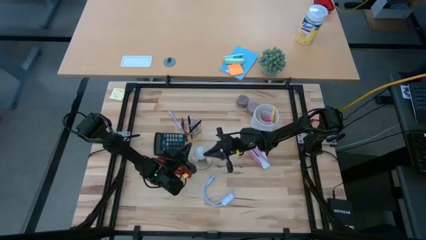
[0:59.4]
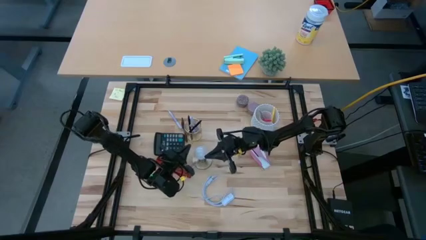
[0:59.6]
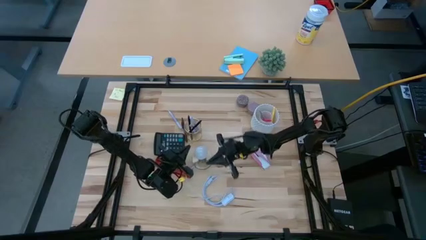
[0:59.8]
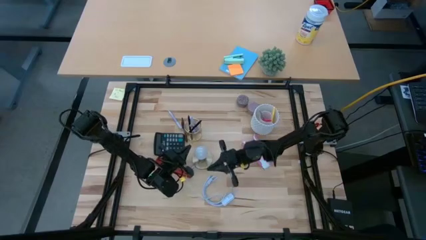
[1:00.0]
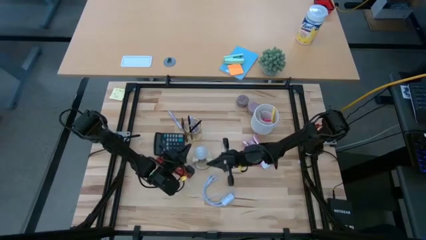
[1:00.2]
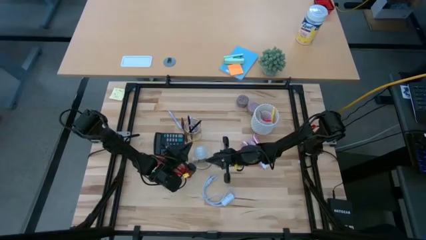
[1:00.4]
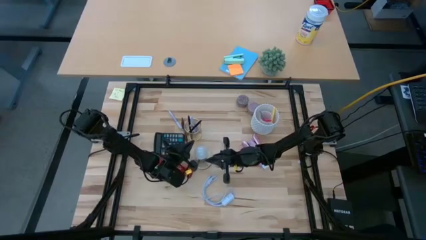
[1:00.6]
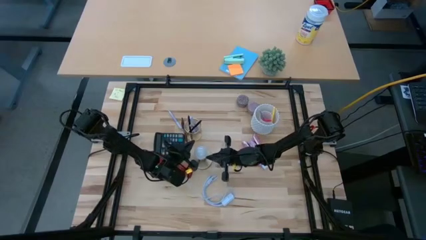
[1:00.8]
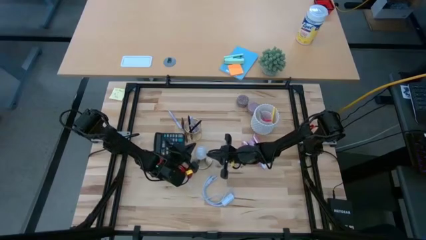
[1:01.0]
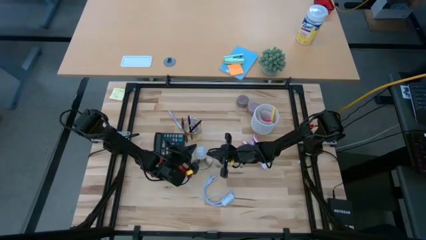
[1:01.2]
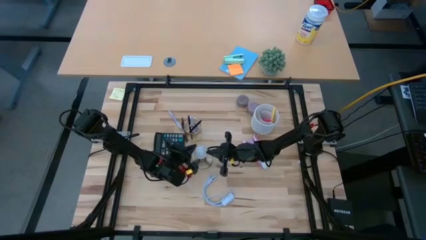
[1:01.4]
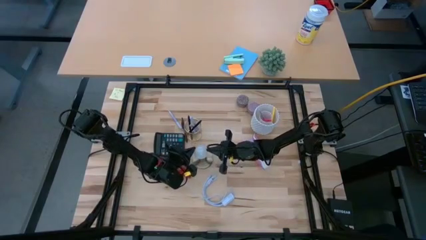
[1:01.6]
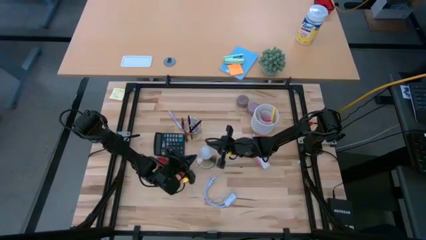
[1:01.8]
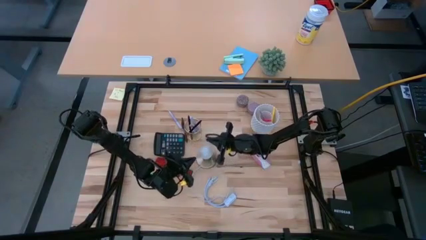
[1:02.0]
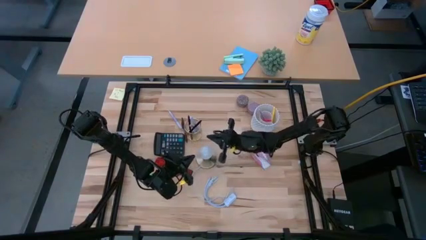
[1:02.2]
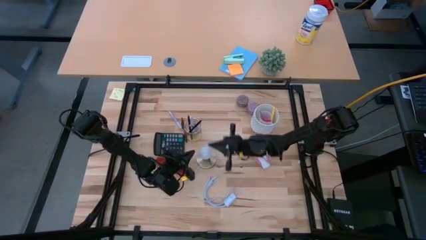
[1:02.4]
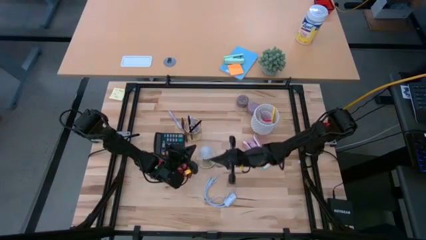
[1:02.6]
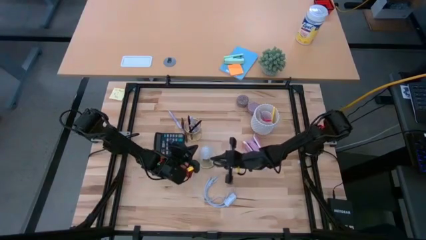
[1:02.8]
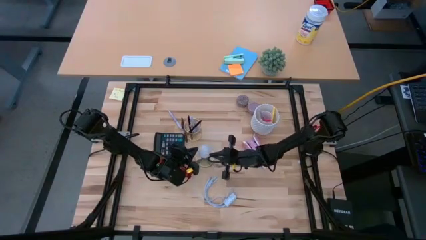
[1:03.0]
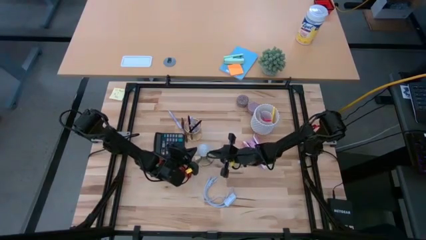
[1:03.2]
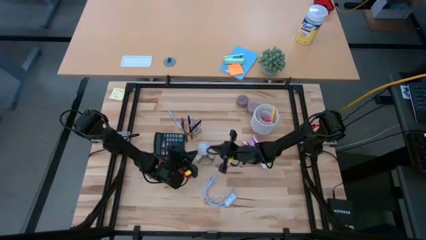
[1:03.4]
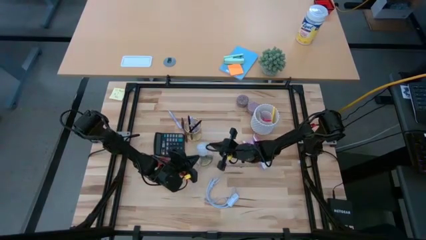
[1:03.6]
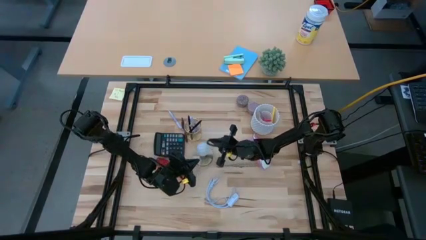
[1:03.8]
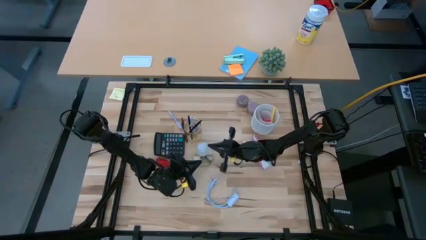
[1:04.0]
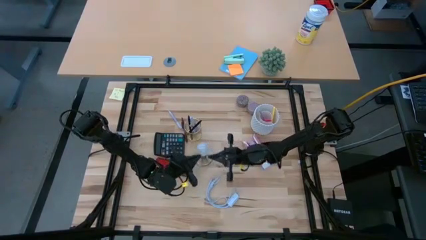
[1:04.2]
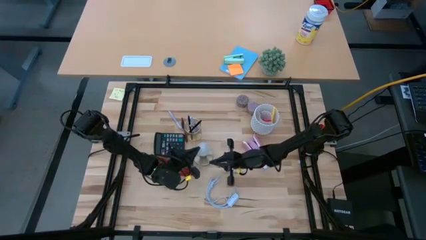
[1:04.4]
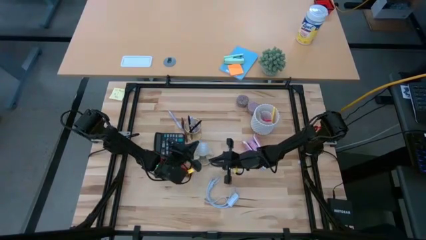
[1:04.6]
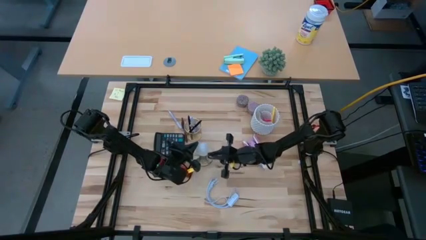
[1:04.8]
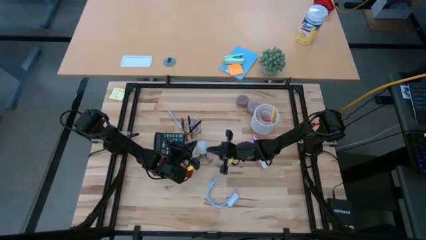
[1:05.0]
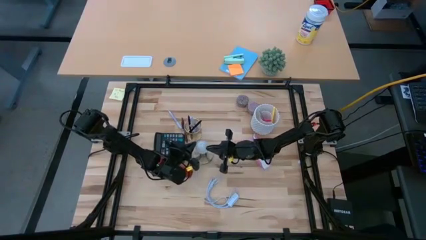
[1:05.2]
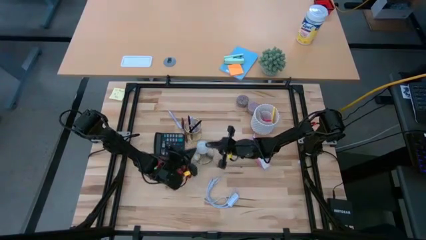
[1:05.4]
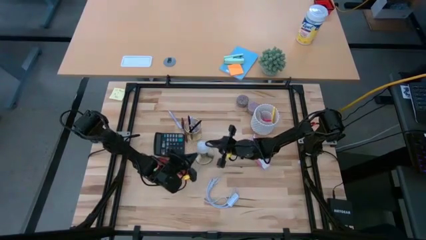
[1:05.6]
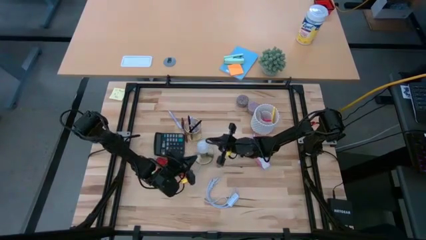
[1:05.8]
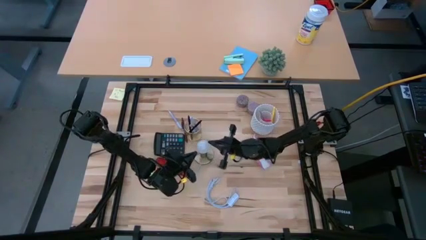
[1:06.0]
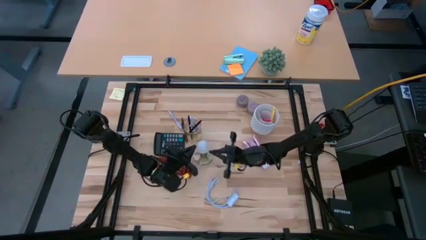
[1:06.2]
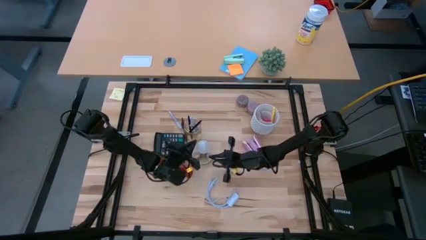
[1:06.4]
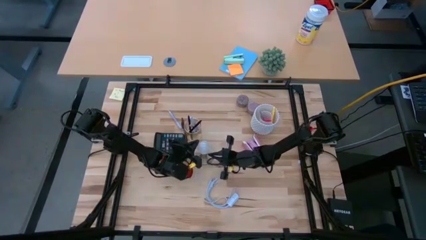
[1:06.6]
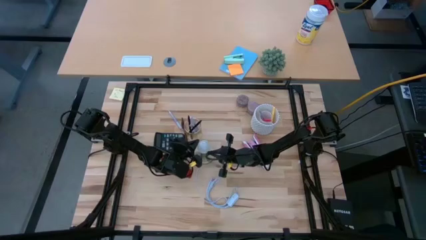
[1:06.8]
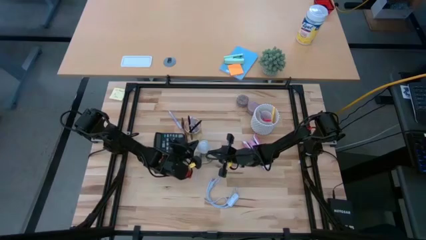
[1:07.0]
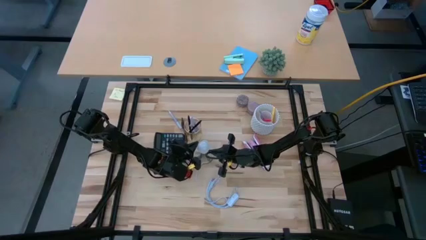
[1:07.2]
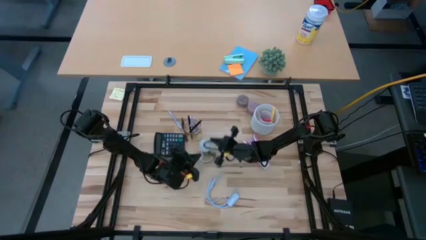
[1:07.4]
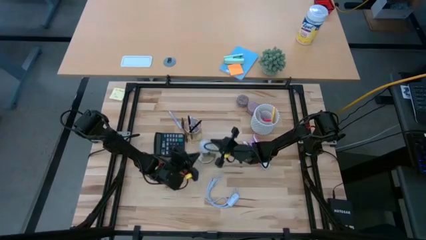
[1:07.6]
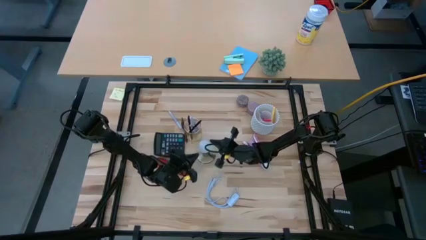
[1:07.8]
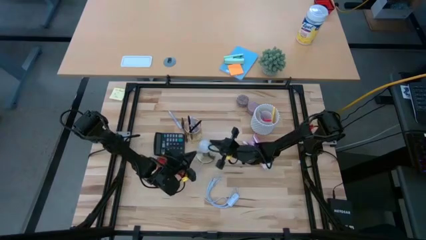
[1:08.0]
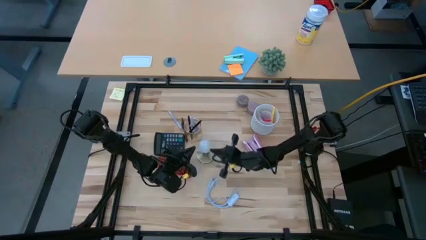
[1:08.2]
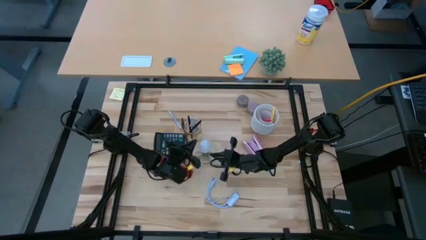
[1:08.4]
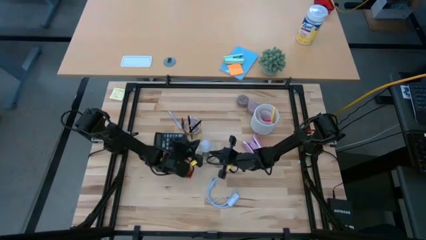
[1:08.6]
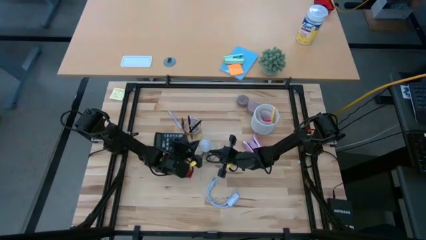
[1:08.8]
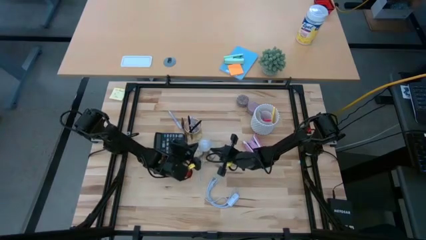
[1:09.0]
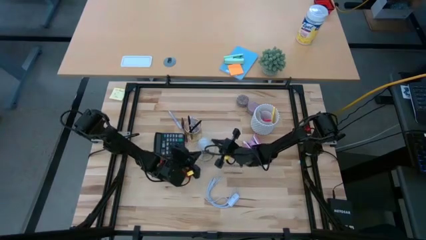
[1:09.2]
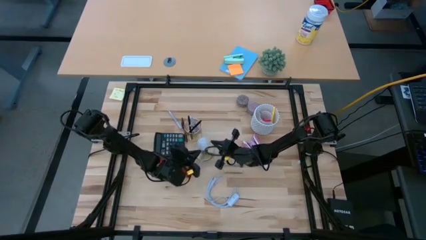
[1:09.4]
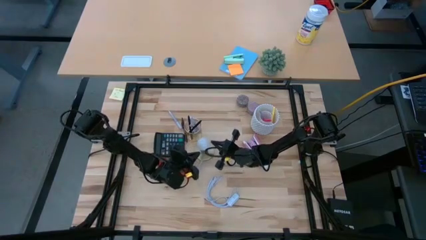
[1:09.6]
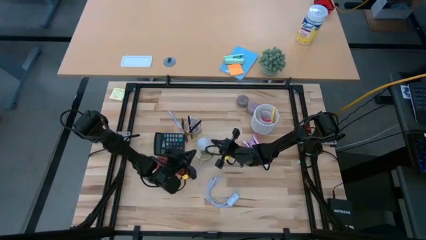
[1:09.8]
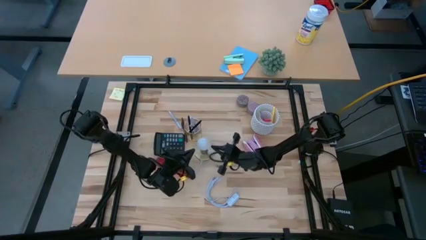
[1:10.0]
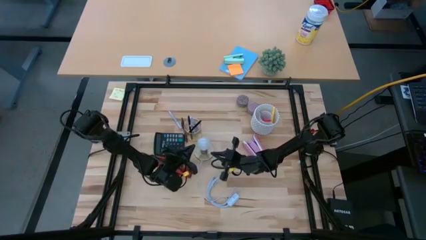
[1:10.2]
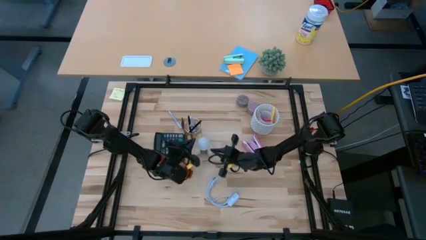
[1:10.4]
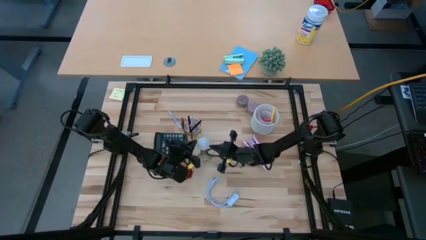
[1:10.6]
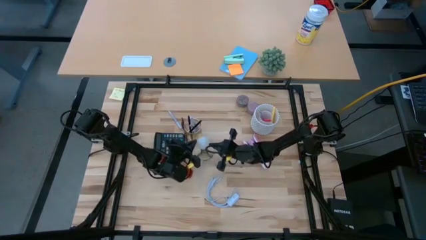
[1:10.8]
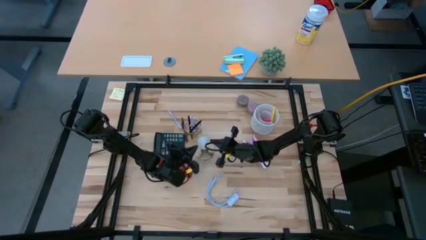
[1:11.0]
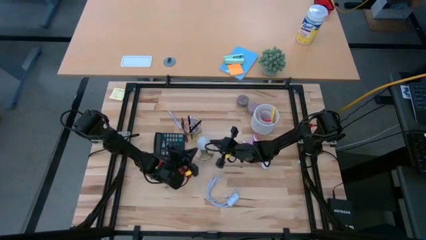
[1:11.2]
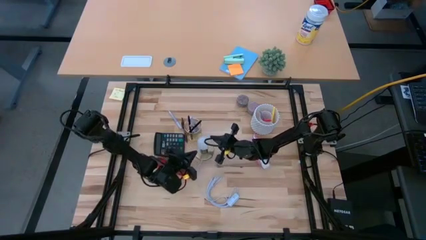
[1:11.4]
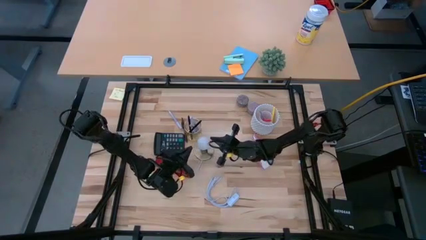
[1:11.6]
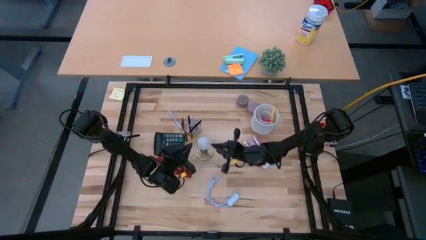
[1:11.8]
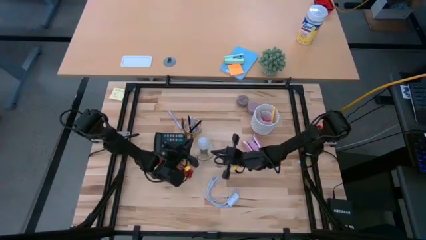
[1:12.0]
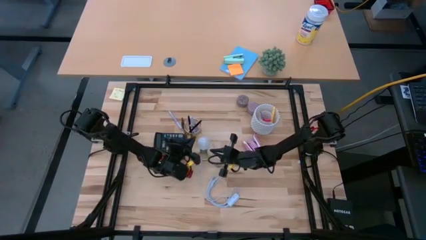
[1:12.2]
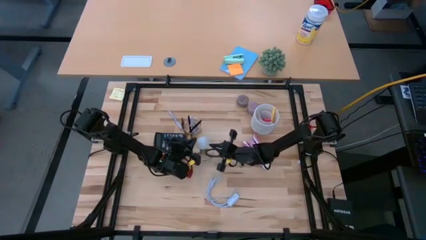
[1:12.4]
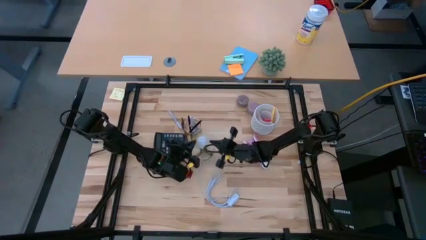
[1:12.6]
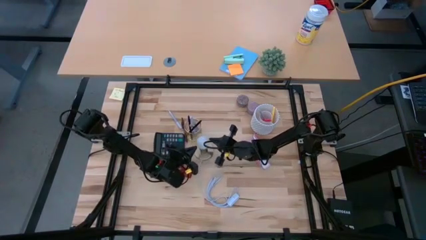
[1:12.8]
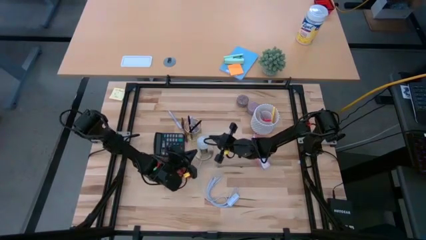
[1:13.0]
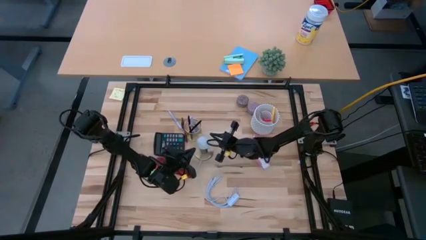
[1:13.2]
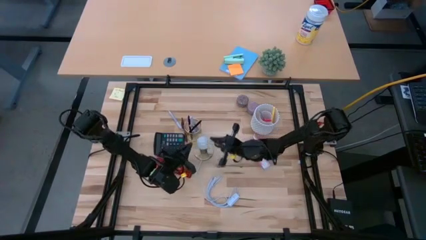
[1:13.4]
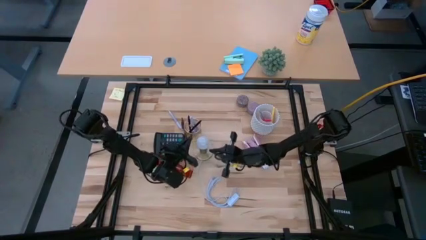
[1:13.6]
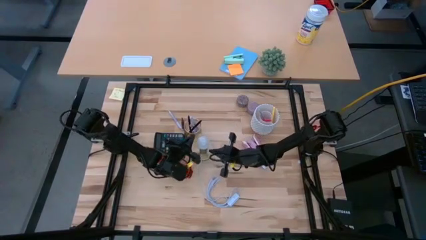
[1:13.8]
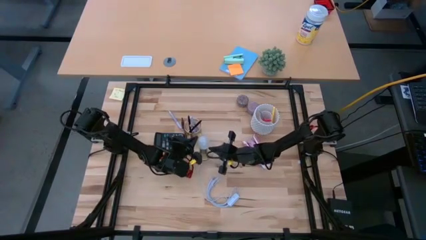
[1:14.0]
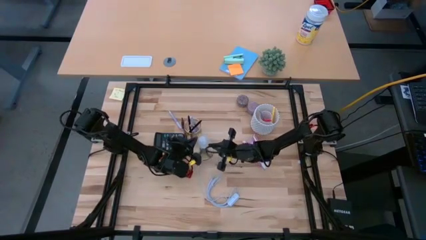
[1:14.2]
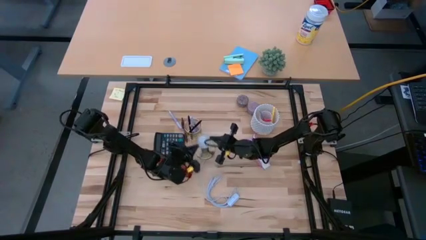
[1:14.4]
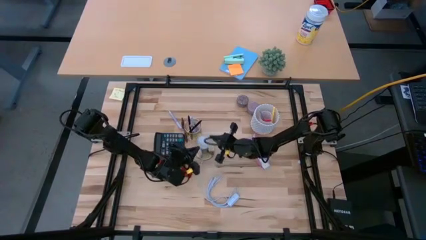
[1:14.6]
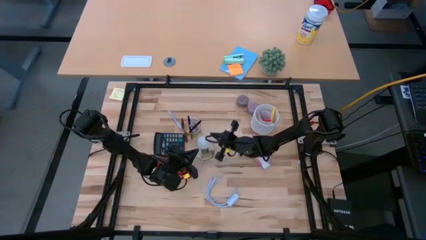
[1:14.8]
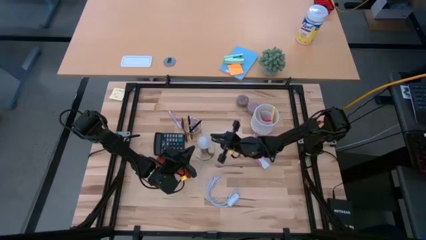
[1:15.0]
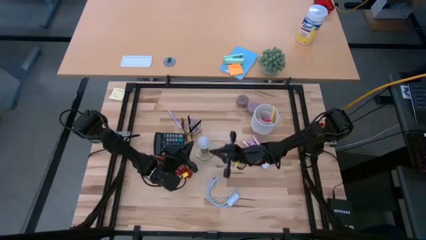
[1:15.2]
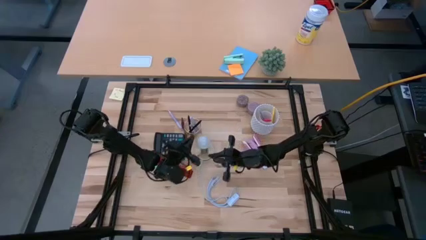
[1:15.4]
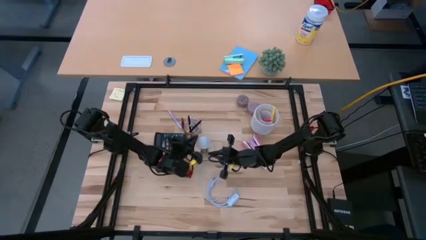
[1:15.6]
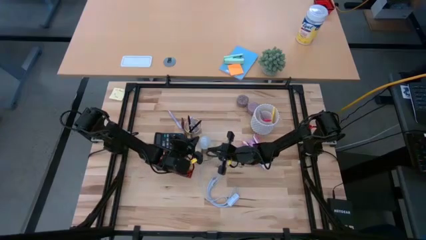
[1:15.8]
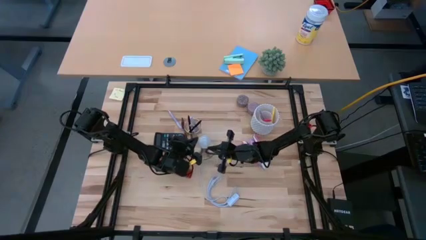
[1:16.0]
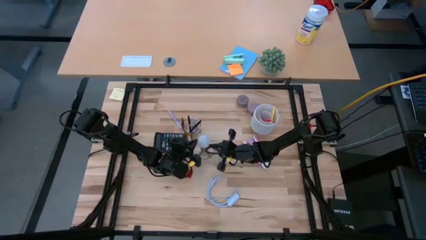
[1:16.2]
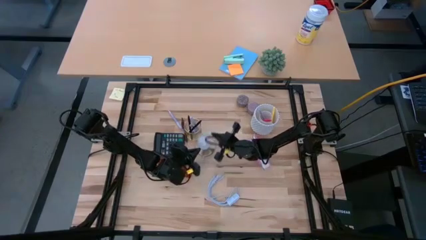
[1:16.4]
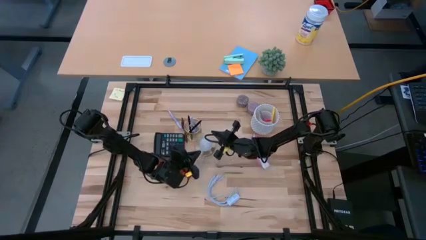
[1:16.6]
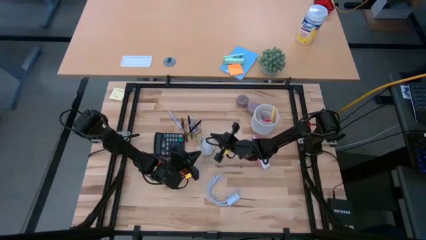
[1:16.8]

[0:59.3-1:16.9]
Task: Screw lightbulb
Remove the white lightbulb from the gold lamp
